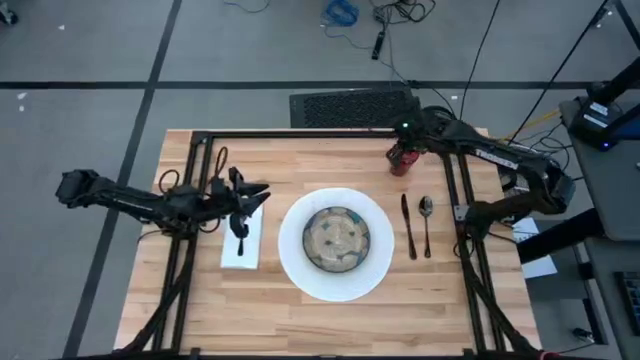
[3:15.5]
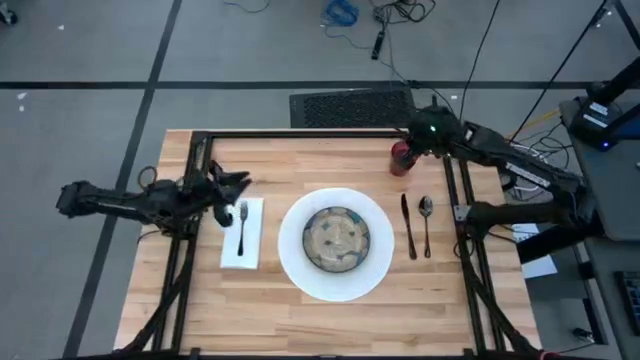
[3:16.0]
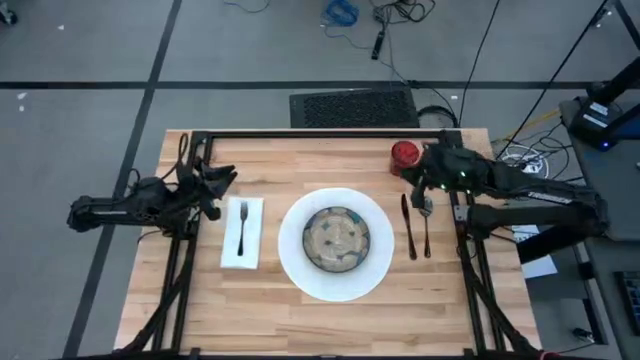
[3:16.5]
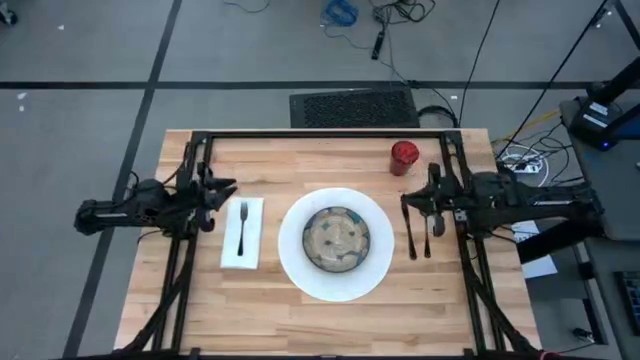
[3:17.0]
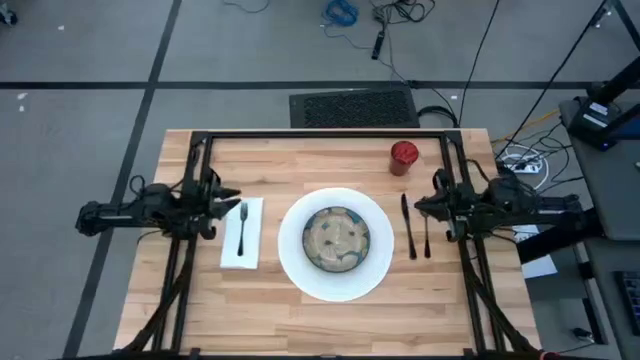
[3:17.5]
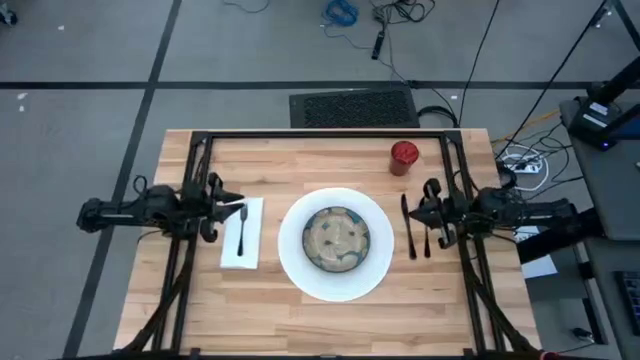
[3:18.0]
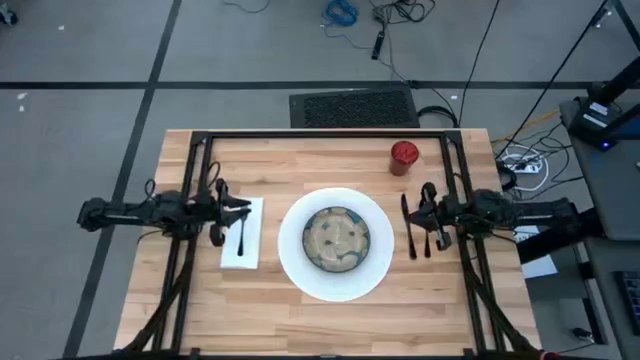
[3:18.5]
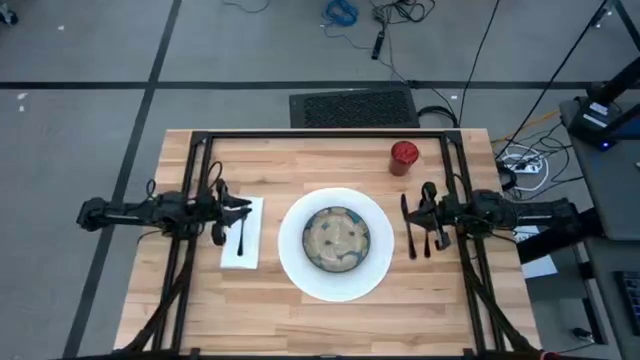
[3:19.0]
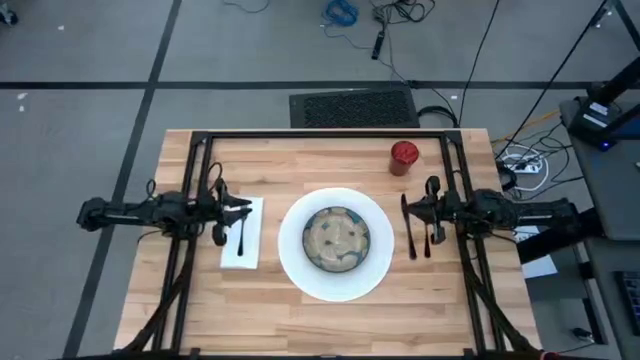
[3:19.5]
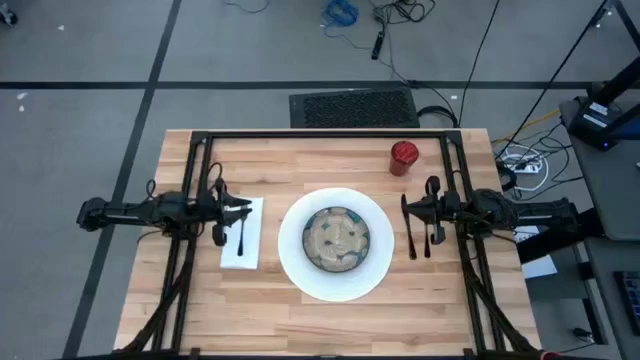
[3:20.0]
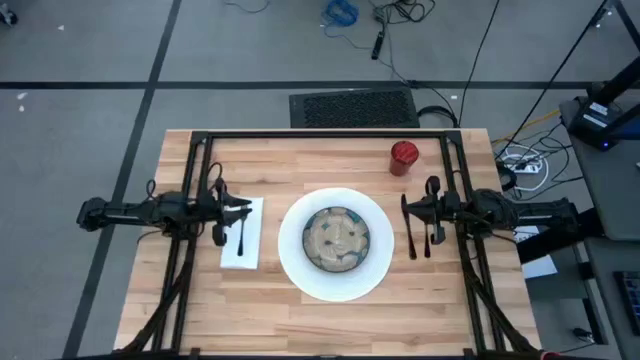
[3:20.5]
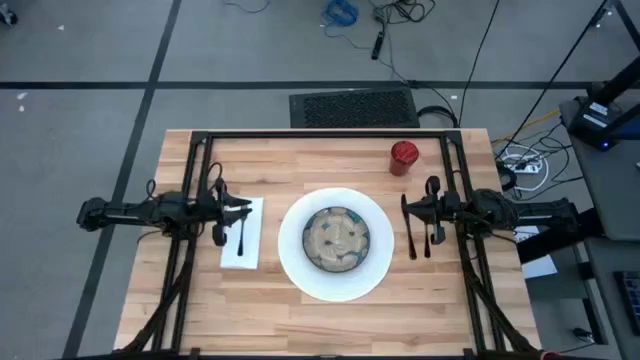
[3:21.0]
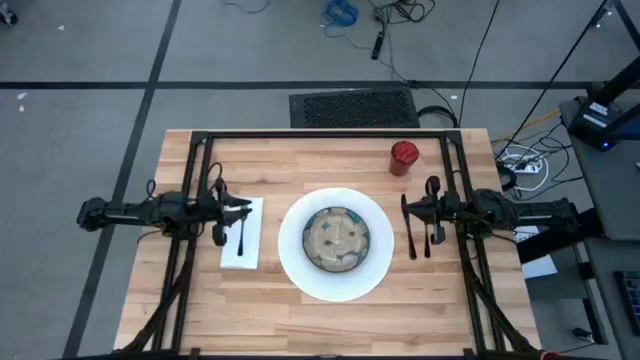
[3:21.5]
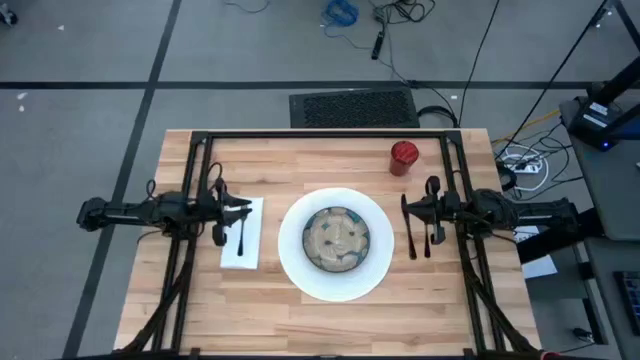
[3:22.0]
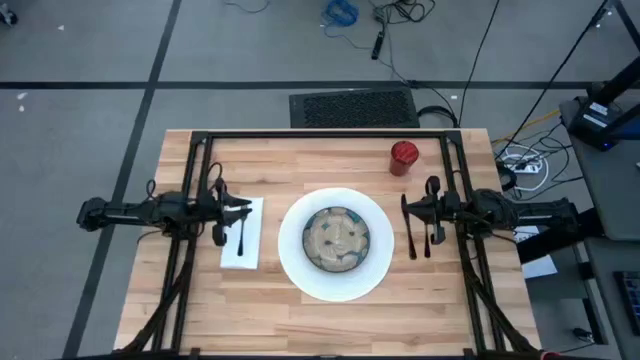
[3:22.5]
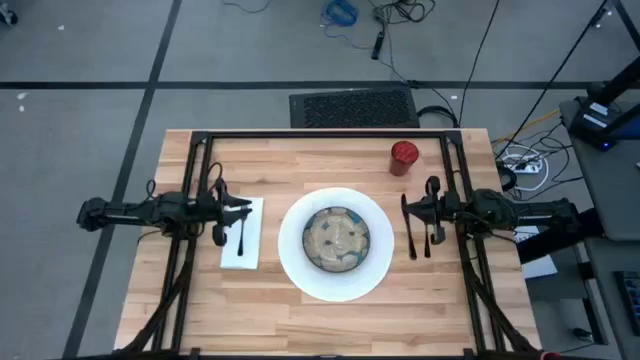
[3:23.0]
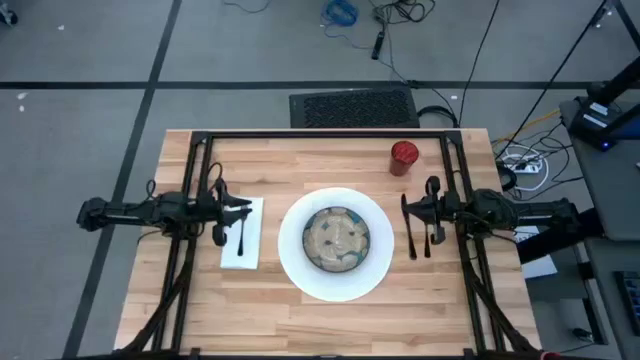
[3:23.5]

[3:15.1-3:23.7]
Task: Set table place
Return to Home Position
